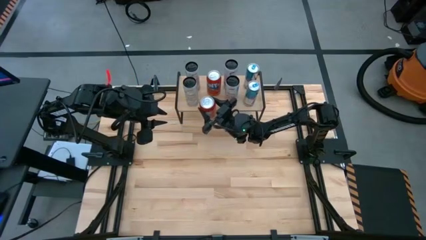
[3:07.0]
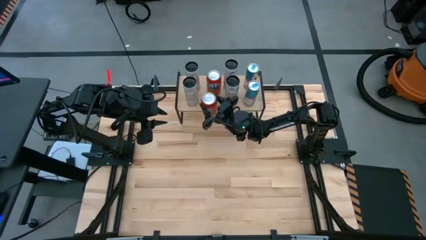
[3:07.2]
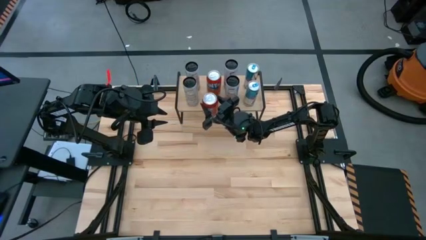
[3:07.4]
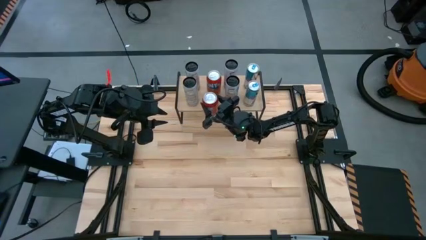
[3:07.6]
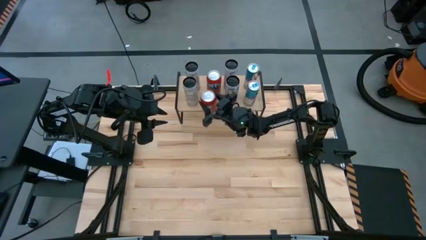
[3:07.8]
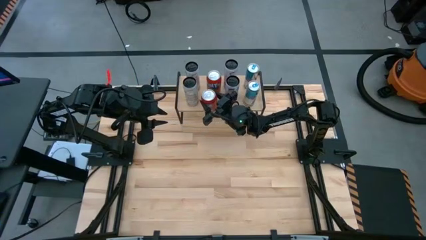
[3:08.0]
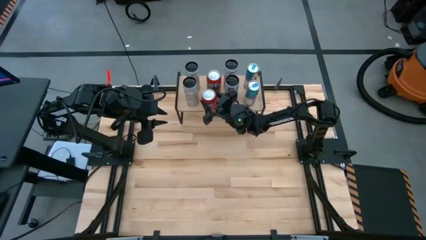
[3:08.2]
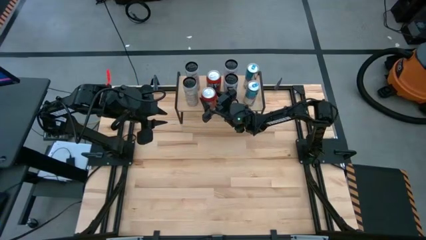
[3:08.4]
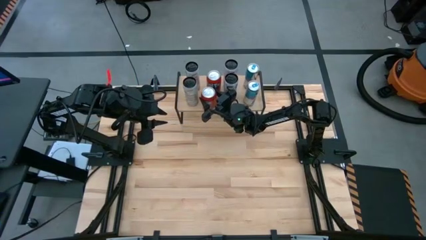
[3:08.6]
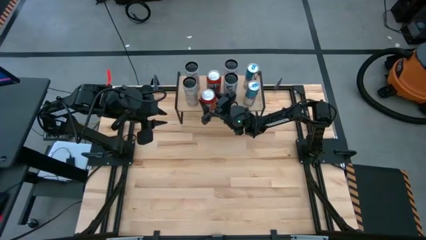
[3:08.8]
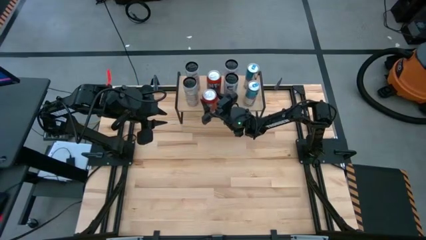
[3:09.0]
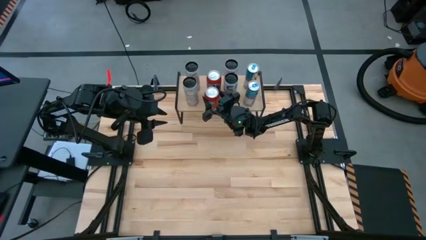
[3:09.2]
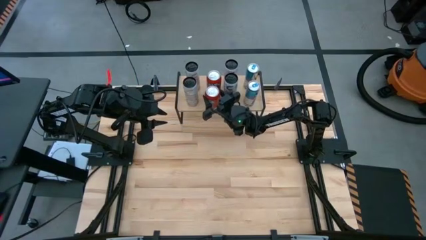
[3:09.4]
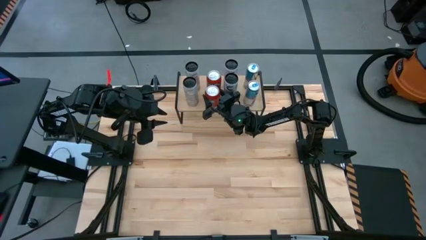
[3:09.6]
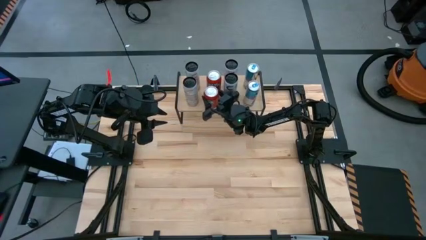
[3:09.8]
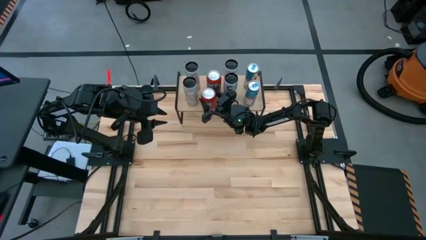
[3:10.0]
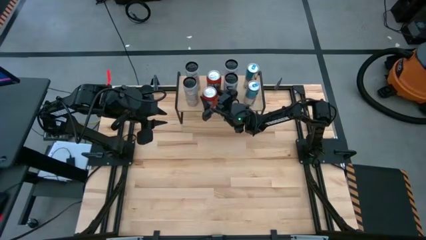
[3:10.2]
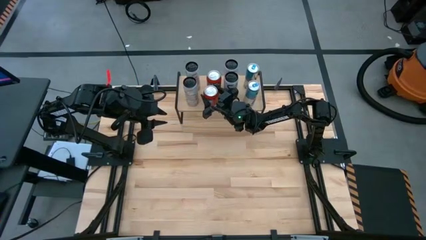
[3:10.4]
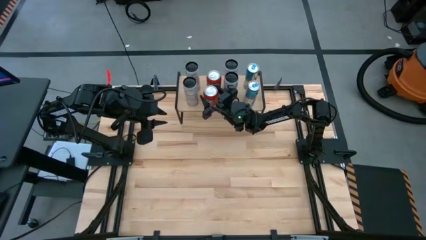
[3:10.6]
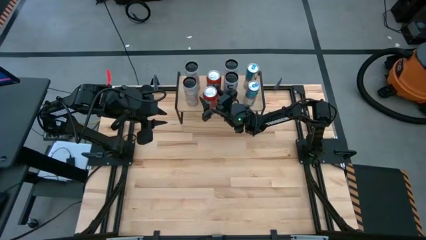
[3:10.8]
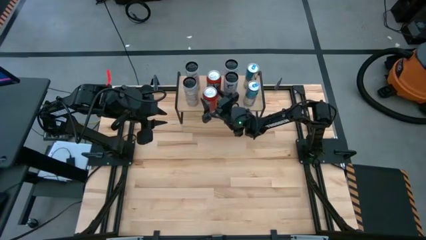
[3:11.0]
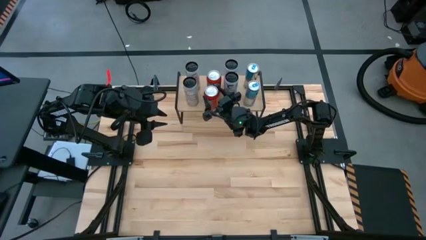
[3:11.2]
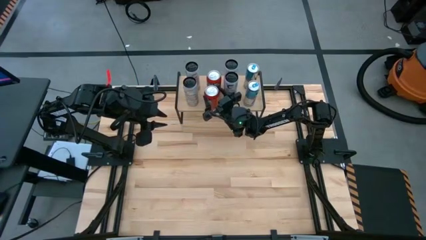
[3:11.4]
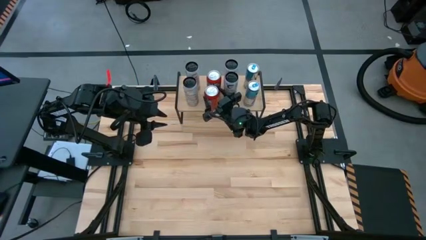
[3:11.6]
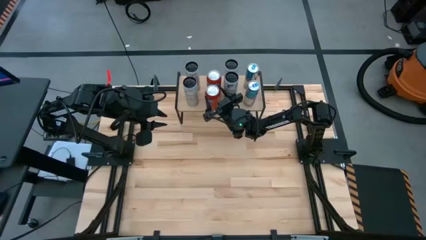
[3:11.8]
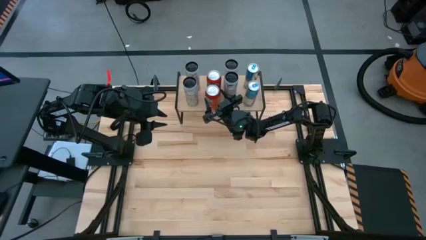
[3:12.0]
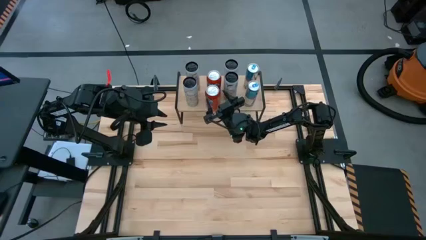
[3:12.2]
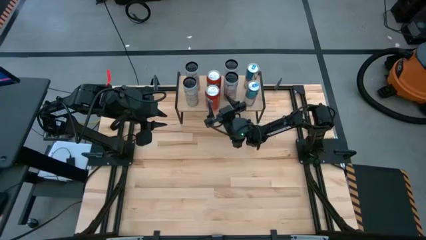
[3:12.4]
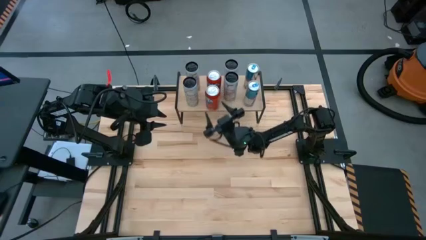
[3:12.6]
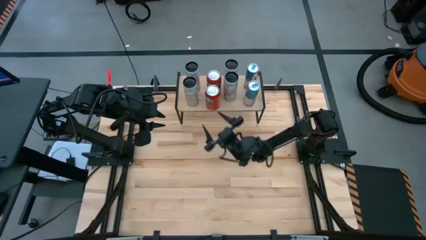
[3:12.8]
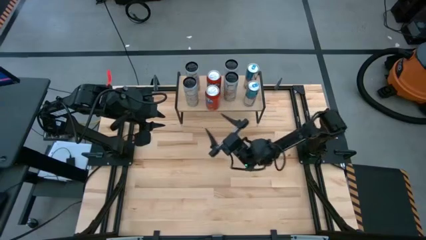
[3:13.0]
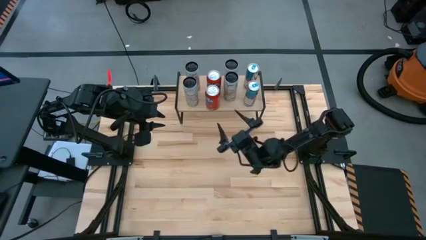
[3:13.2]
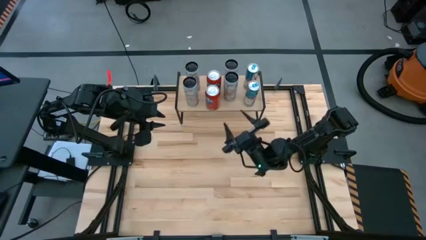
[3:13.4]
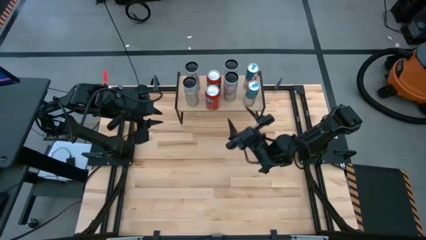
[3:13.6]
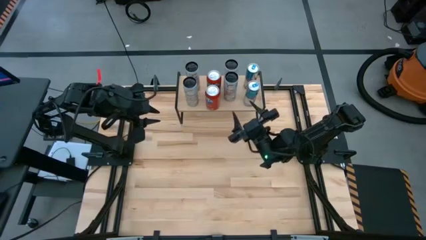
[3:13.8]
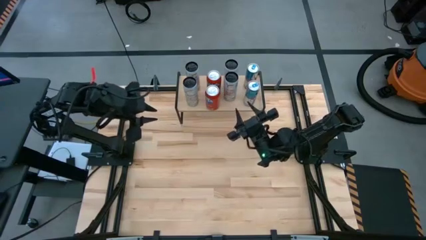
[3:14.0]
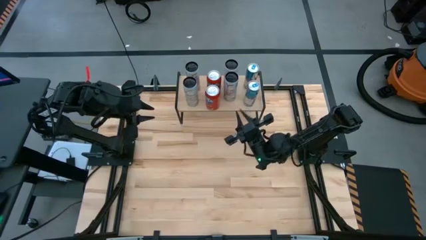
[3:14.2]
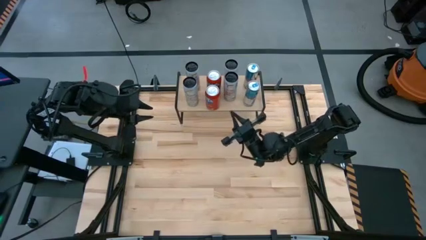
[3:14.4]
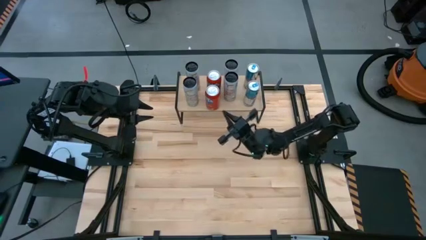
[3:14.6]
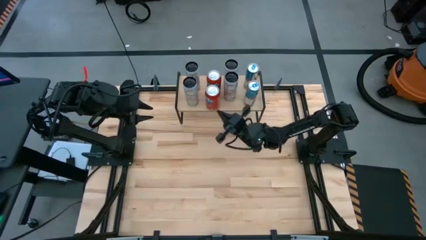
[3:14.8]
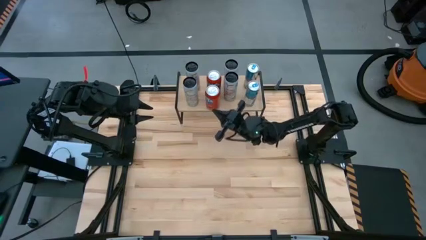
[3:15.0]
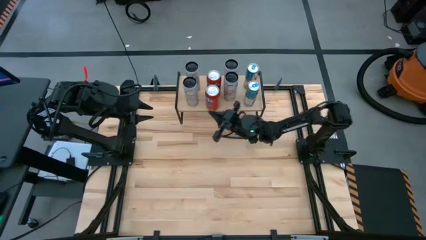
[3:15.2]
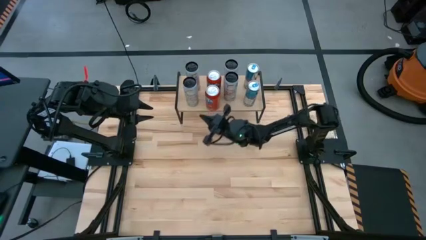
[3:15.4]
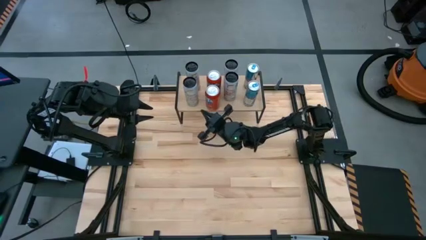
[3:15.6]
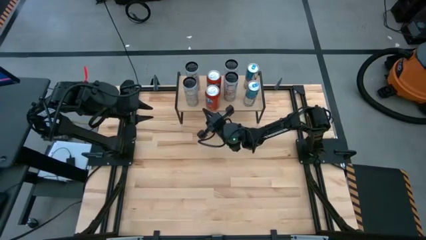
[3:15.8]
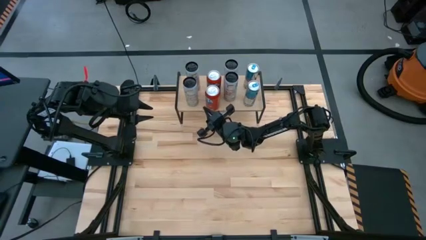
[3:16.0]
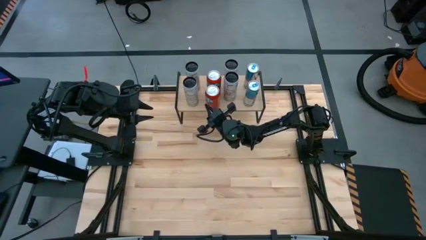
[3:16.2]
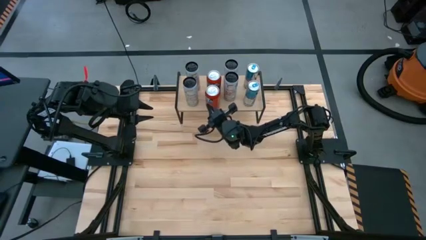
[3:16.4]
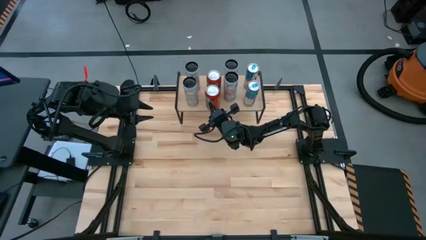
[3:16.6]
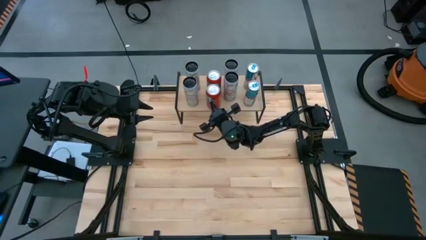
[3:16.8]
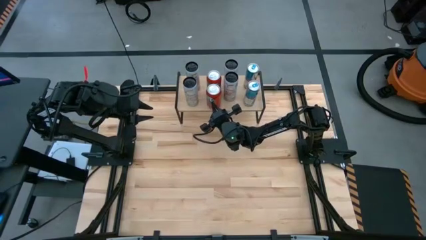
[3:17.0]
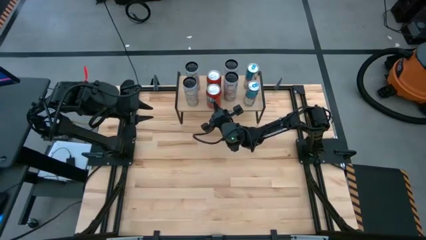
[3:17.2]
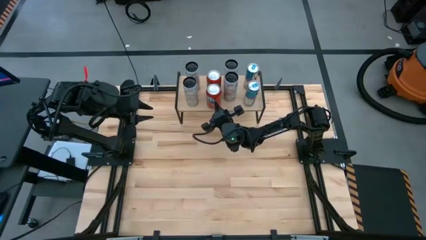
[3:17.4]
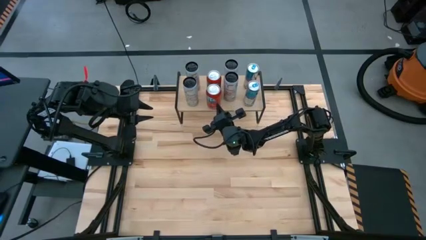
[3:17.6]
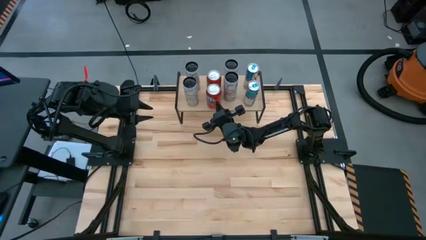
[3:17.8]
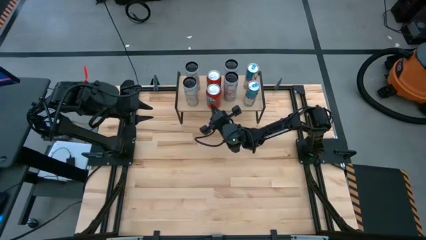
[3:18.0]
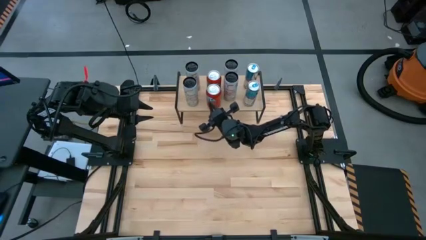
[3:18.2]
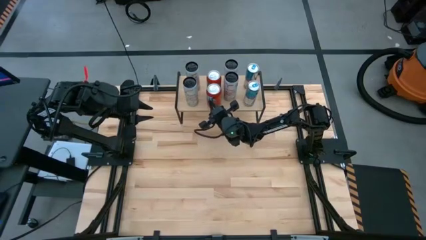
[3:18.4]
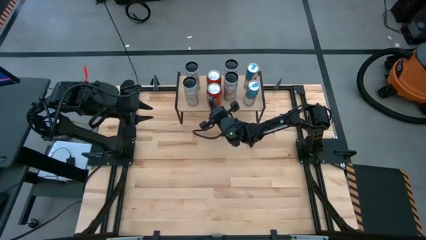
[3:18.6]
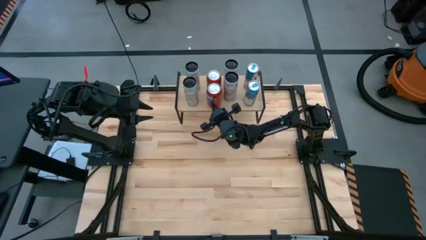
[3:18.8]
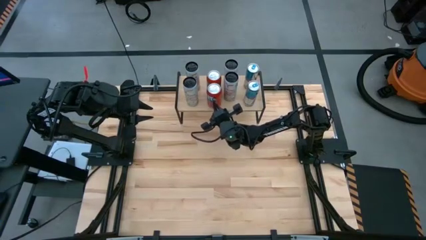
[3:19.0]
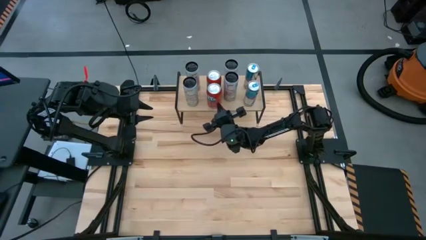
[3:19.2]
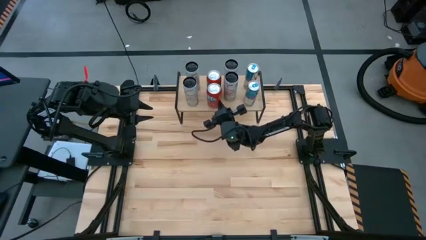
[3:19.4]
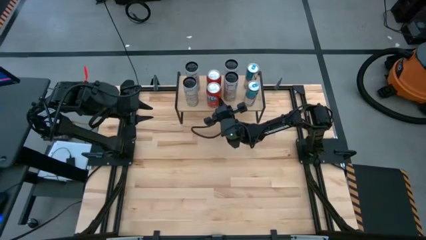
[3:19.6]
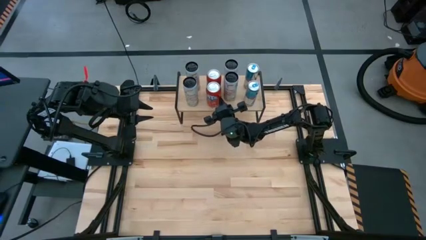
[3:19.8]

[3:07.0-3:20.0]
Task: Place canned beverage on shelf
Put the red soda can on the shelf aligned with the other red soda can

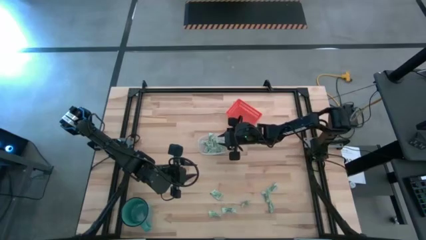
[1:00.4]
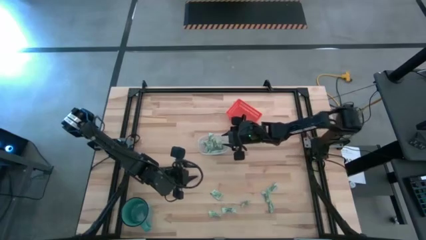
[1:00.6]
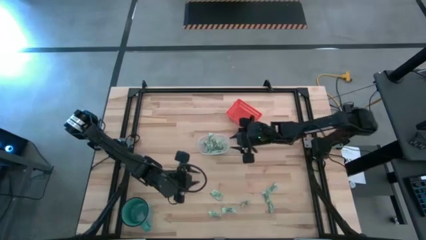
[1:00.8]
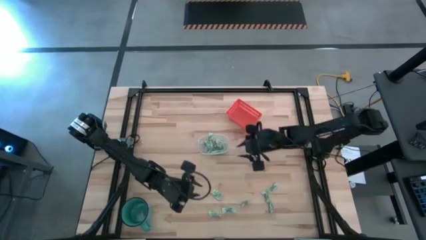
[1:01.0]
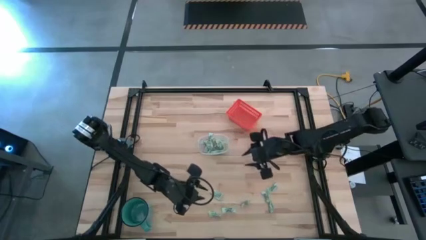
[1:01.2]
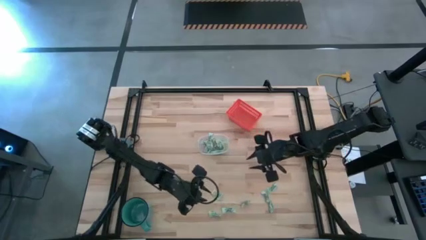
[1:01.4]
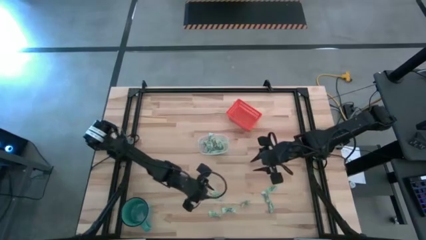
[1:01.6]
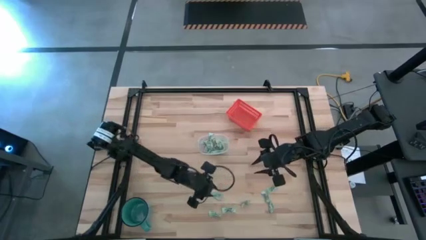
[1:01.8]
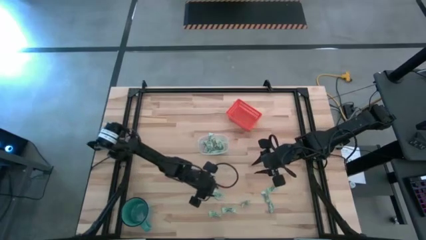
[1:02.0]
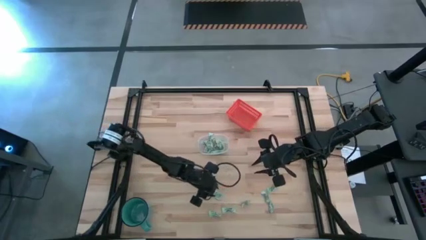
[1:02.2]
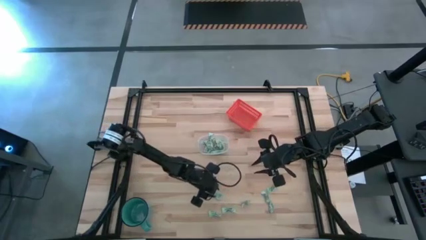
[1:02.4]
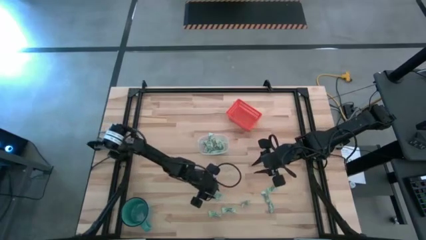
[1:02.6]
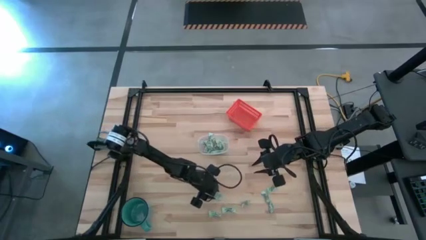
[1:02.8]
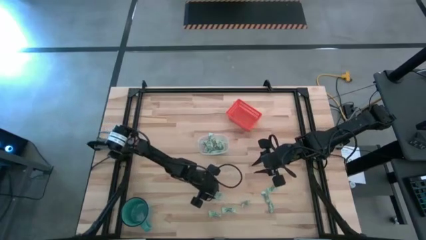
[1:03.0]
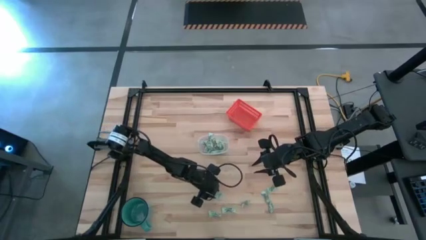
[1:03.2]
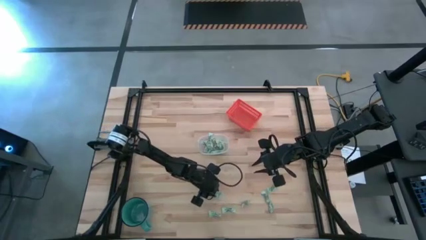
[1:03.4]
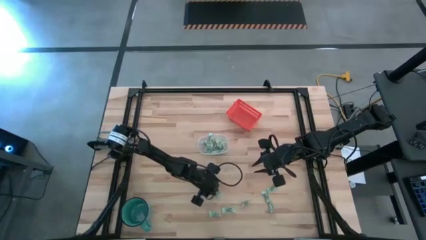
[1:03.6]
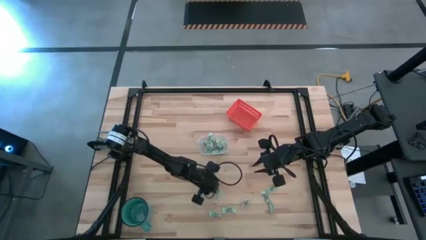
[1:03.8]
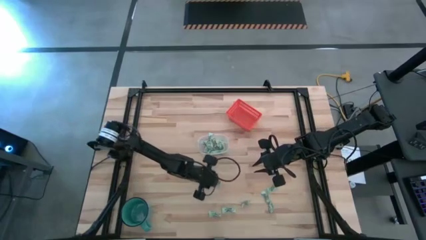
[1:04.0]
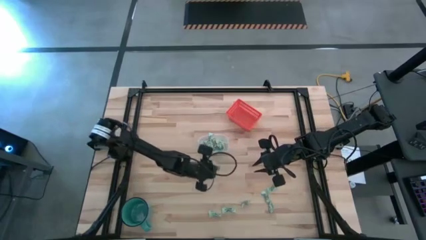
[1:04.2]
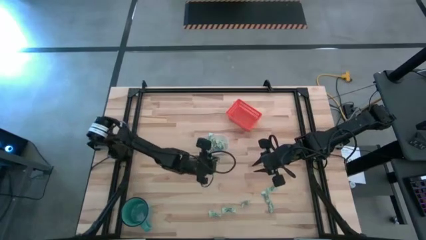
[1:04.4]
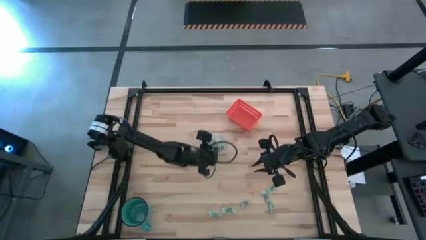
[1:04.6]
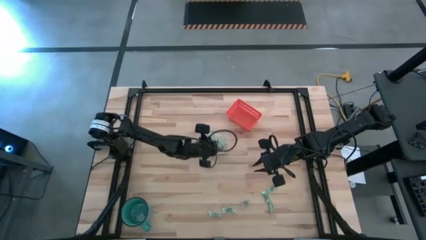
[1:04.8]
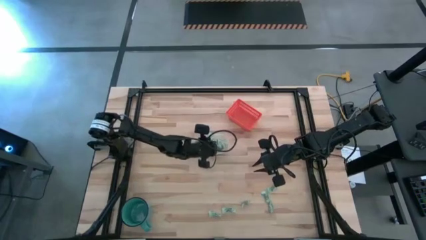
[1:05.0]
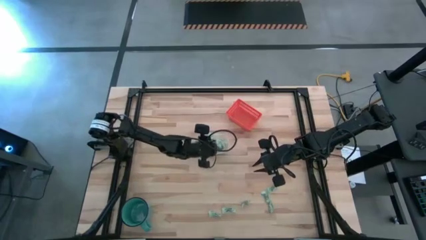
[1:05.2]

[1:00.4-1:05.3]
Task: Pick and place items into bin
Put the stevia packet into the transparent bin
